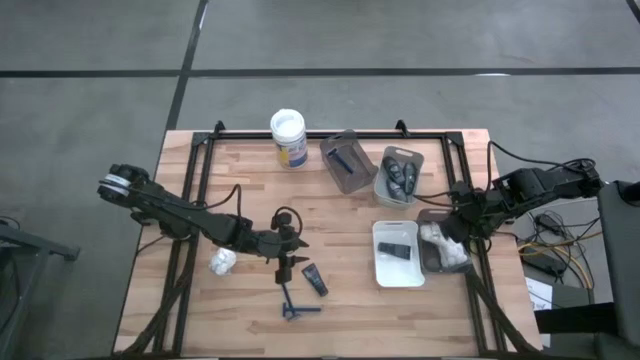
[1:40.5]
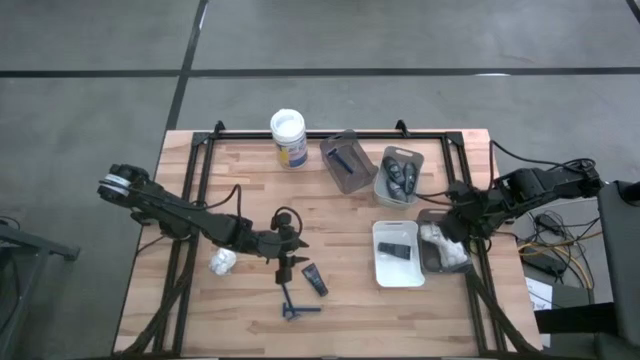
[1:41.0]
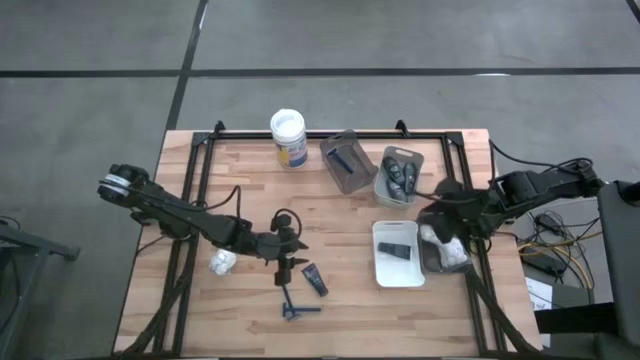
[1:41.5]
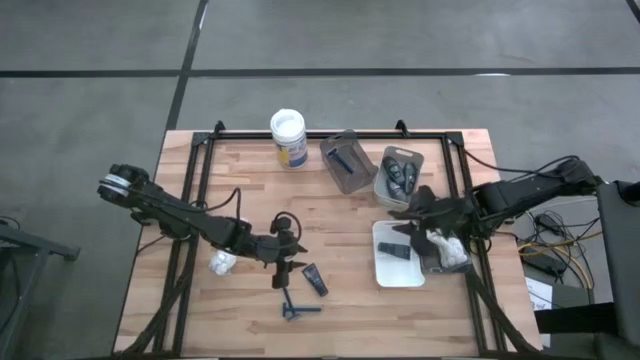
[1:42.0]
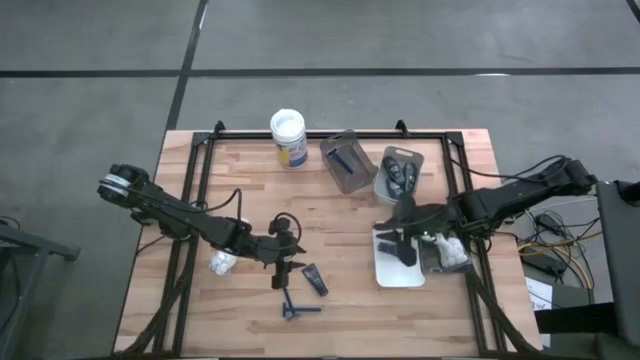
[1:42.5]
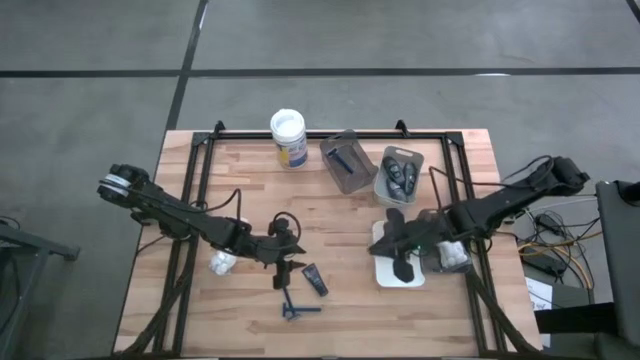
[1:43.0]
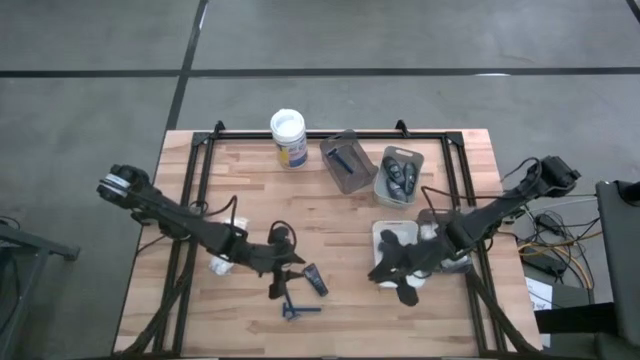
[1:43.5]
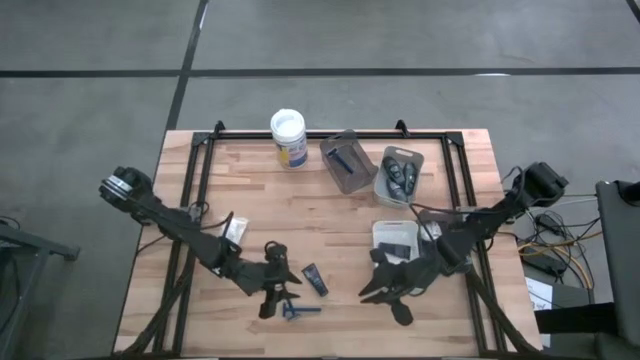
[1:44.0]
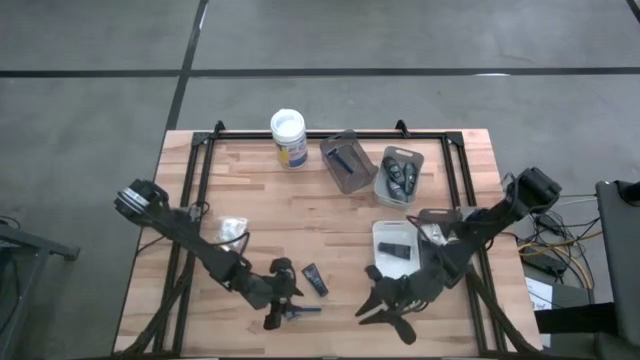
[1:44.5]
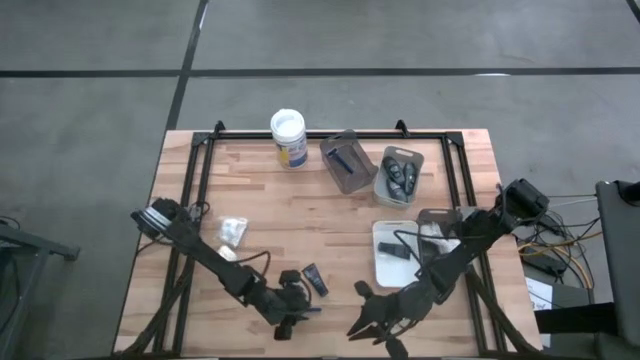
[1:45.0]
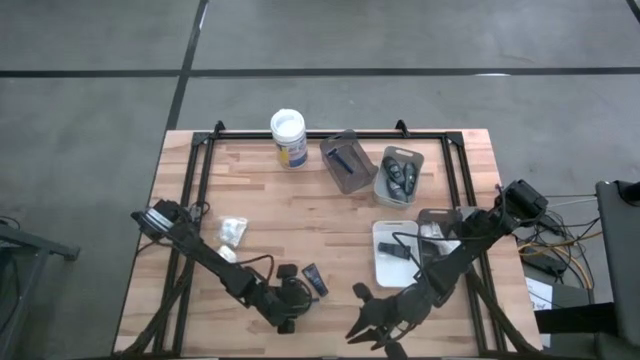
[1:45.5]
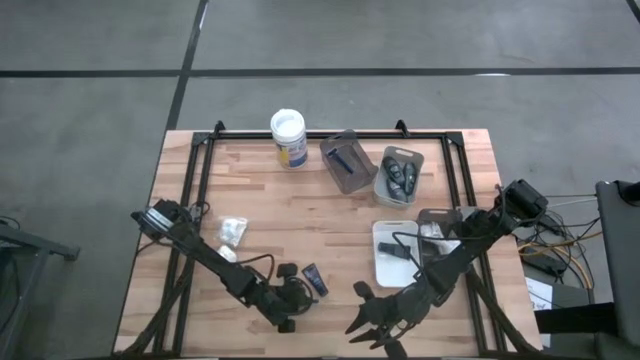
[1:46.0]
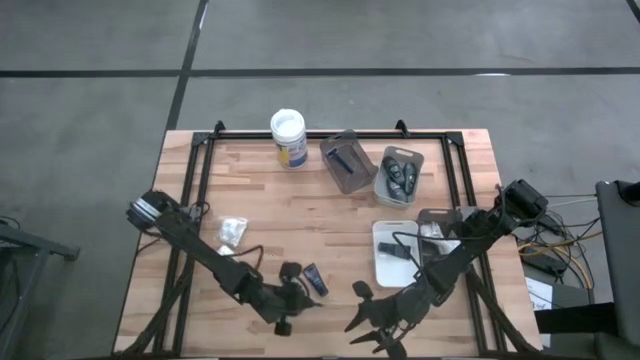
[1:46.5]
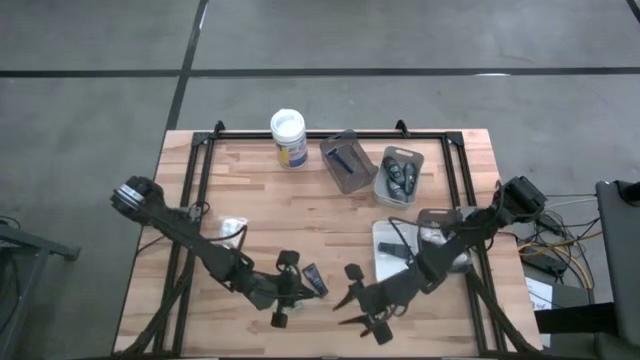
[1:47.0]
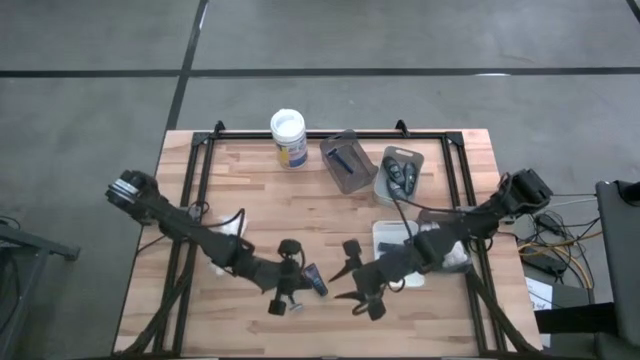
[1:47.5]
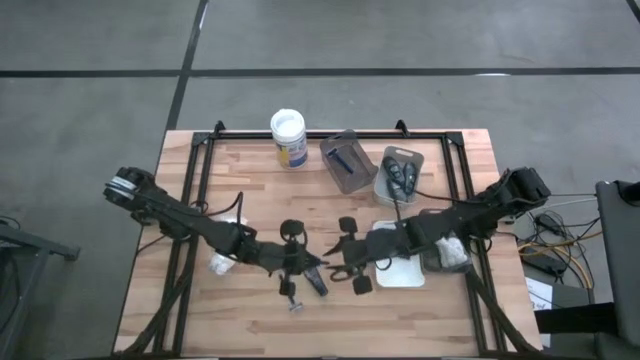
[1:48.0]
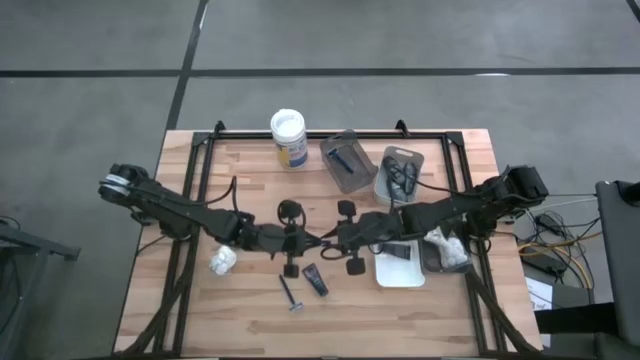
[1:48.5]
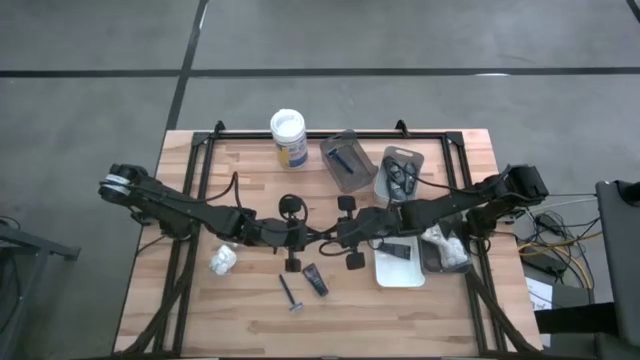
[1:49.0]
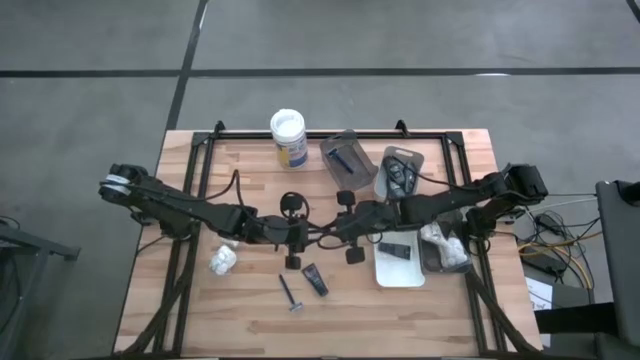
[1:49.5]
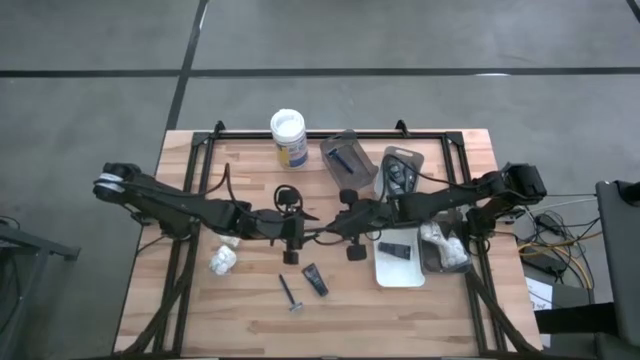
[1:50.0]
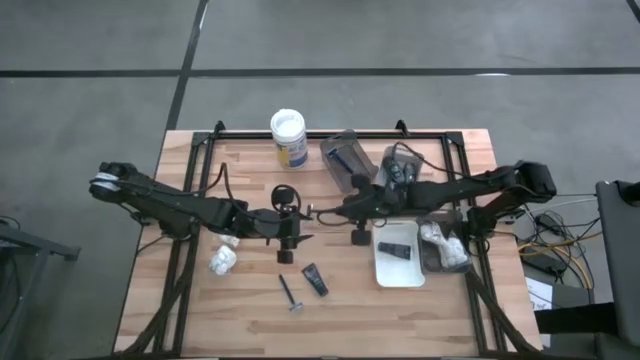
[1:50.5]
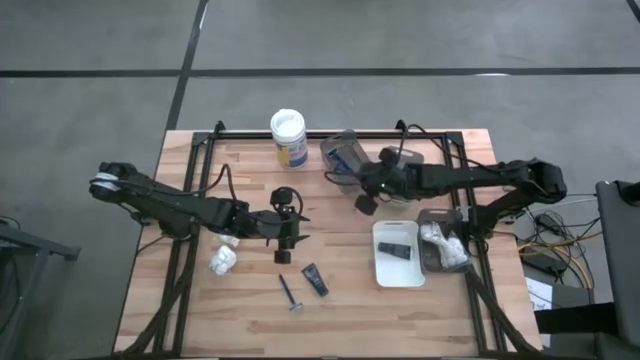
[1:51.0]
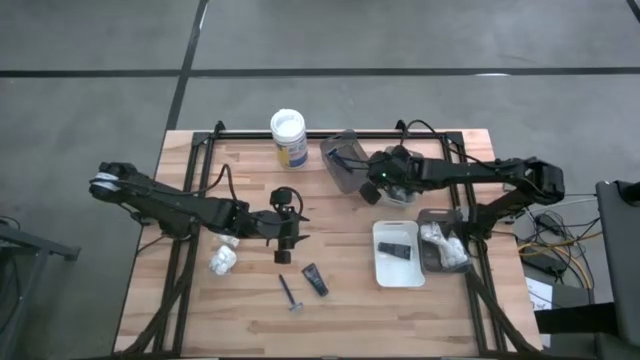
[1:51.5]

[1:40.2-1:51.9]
Task: Pick & Place Travel size toiletries
Put the blue razor into the top black bin

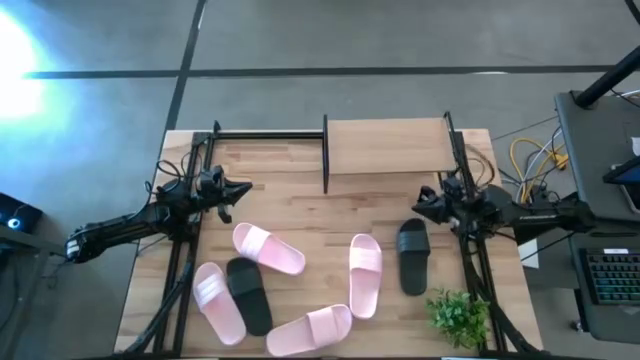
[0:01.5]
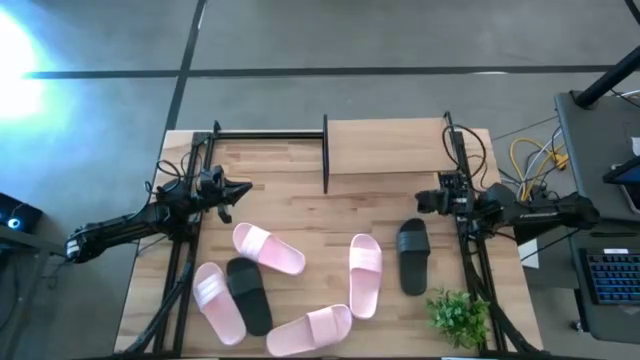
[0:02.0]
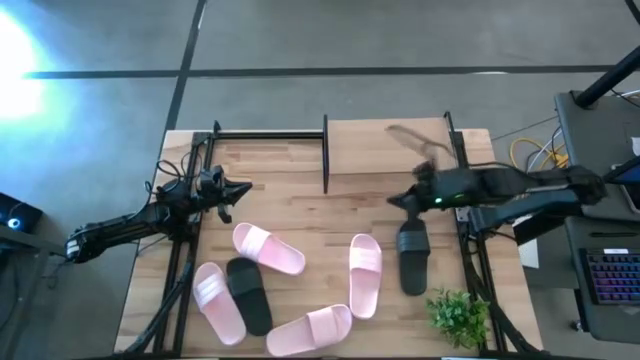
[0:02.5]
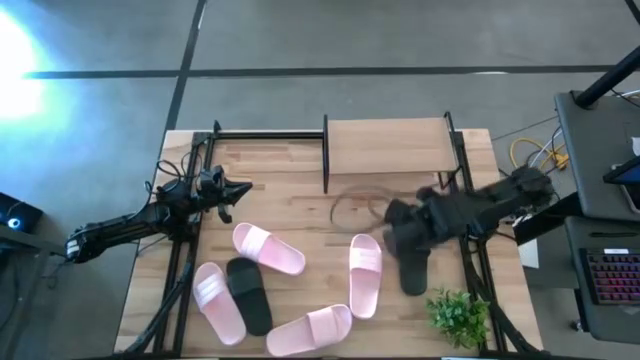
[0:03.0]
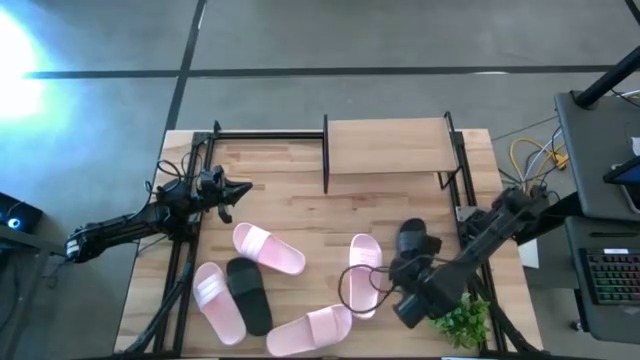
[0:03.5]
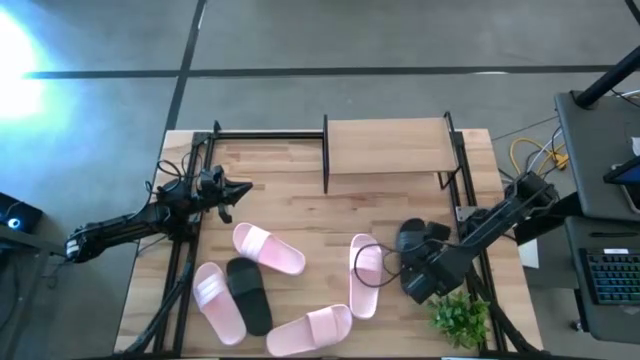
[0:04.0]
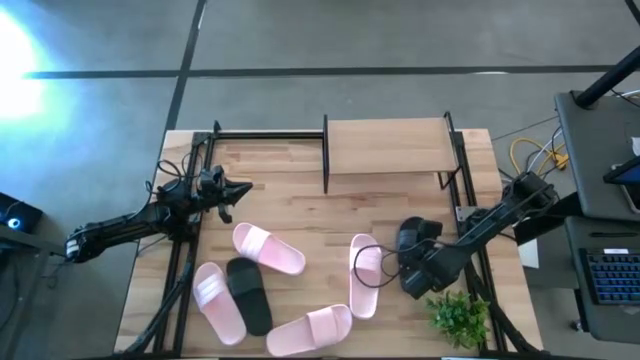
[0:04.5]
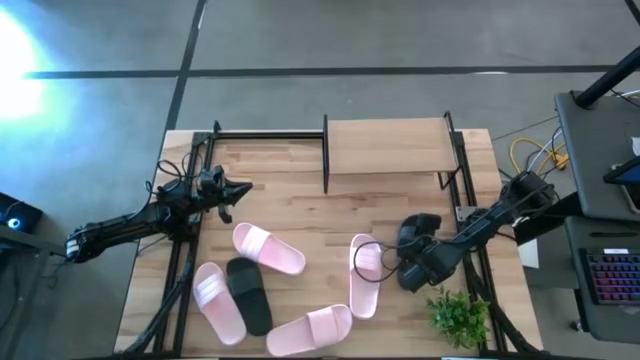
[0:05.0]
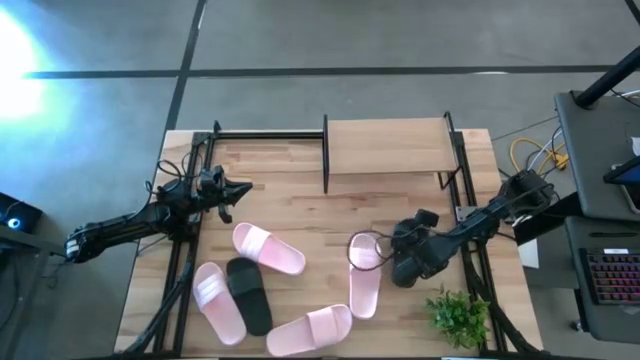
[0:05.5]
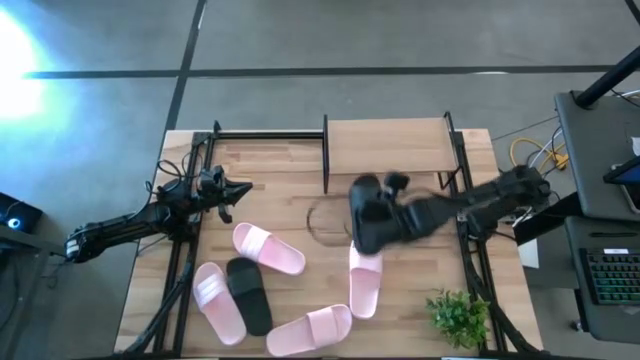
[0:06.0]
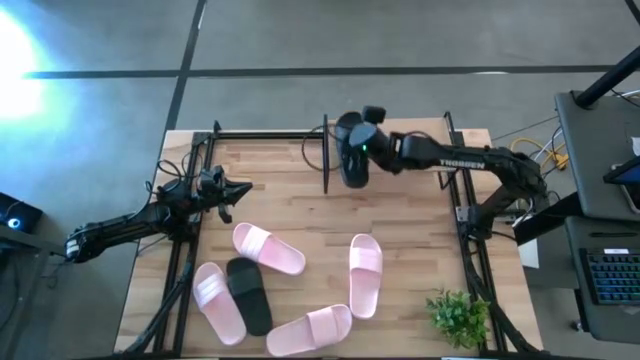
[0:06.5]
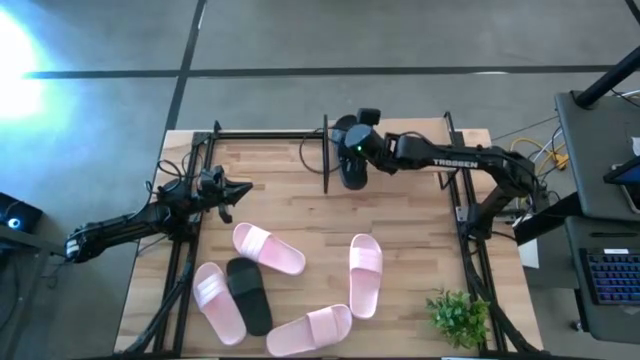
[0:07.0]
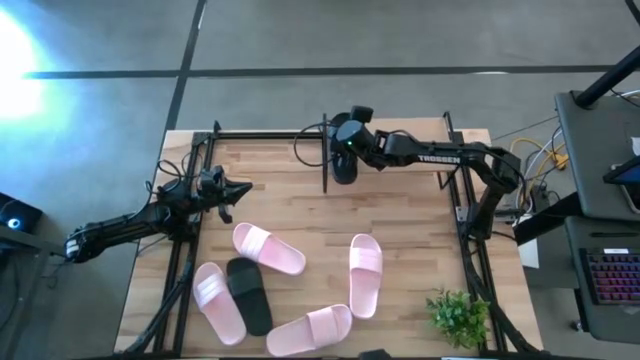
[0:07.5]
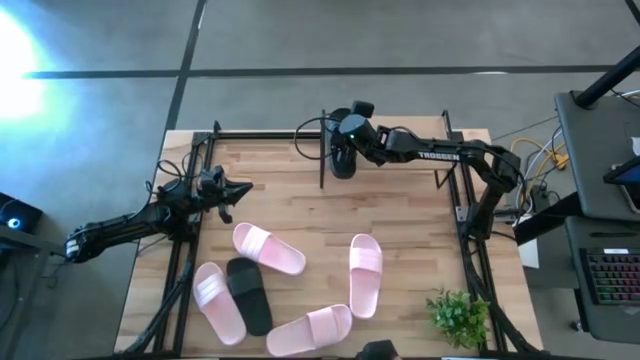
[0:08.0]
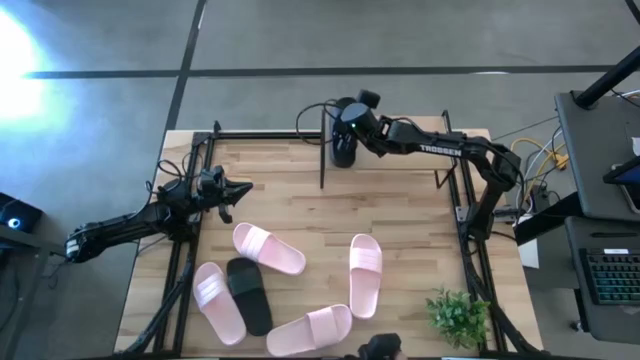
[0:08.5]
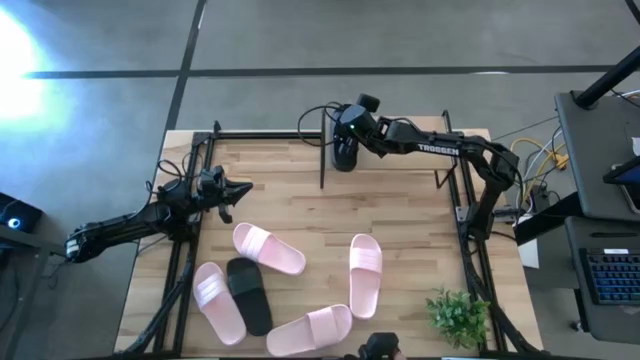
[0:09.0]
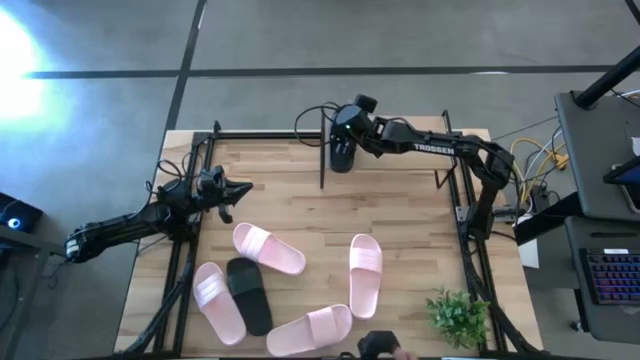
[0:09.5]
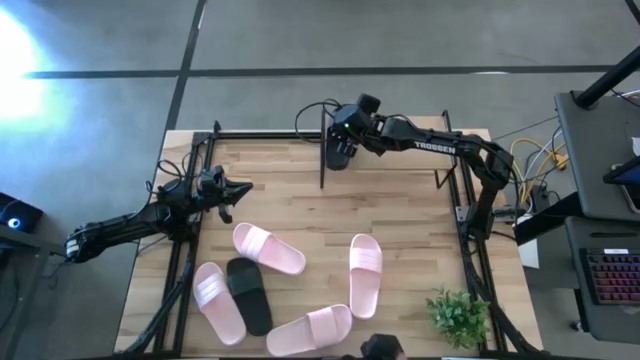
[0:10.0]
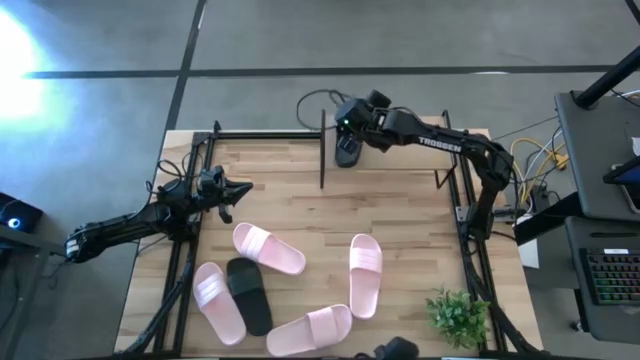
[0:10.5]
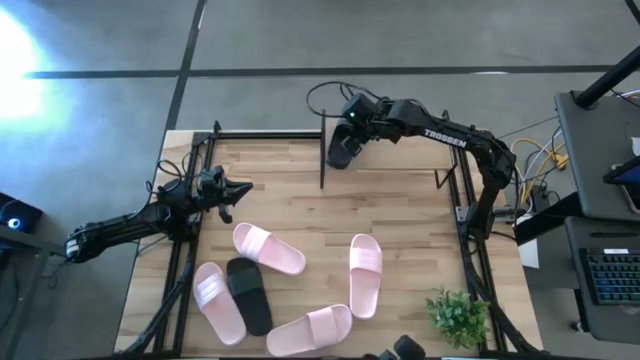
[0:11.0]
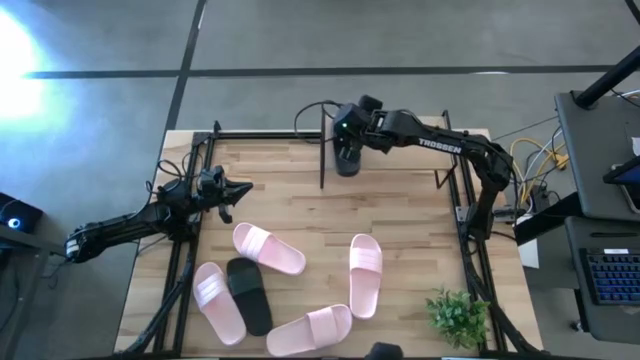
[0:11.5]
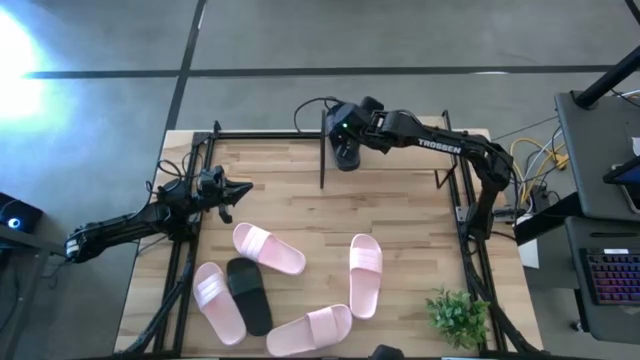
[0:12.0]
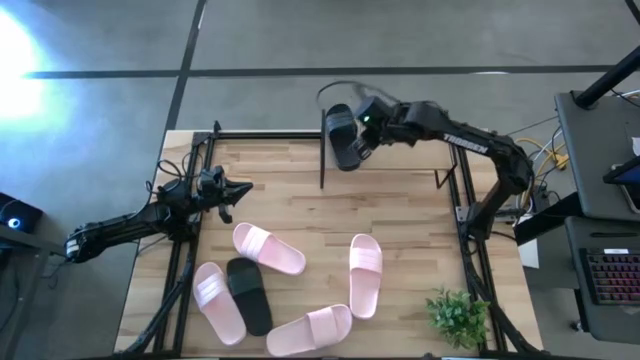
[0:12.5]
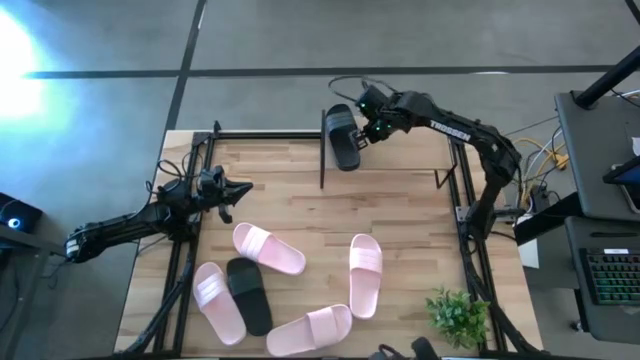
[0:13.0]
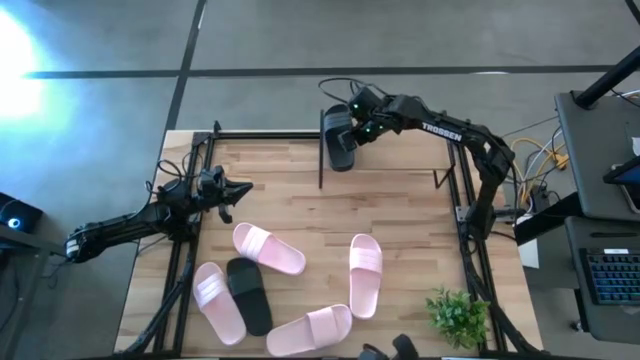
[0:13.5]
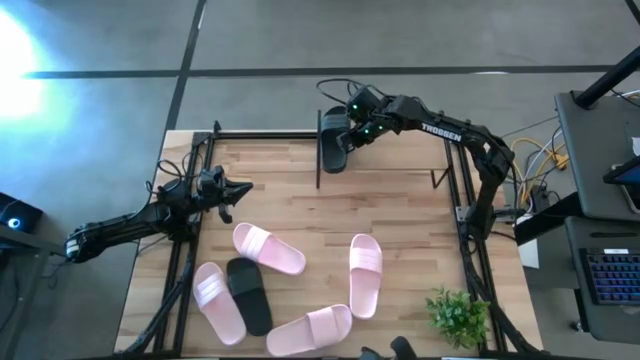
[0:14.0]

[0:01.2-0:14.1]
Task: Pick and place slides into the shelf
Put the black slide on the shelf
